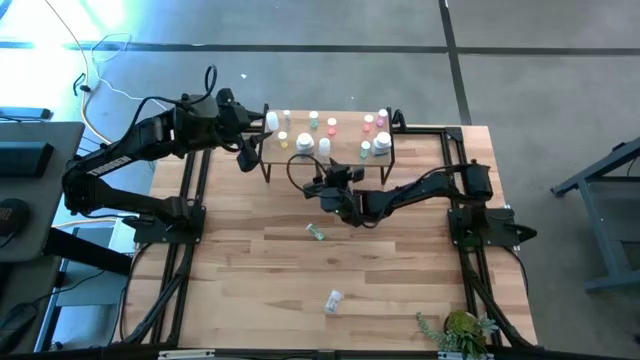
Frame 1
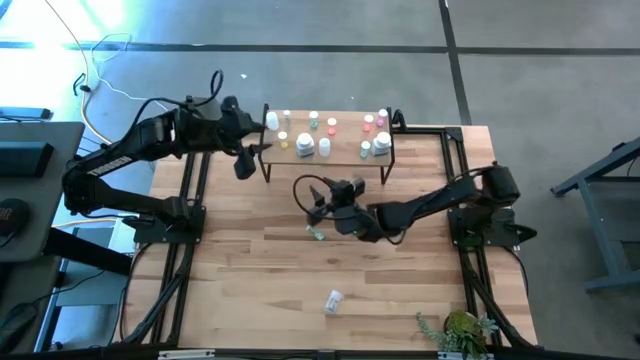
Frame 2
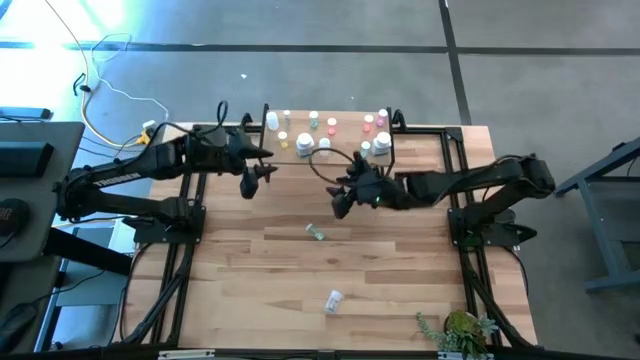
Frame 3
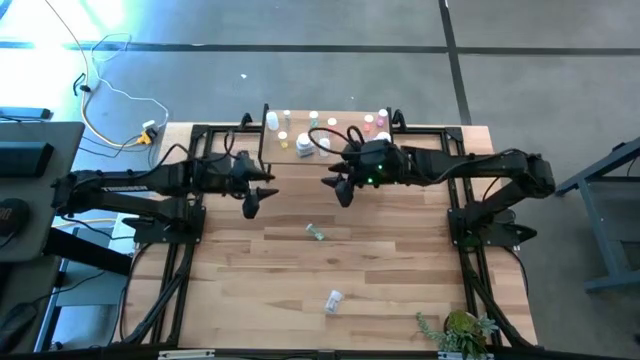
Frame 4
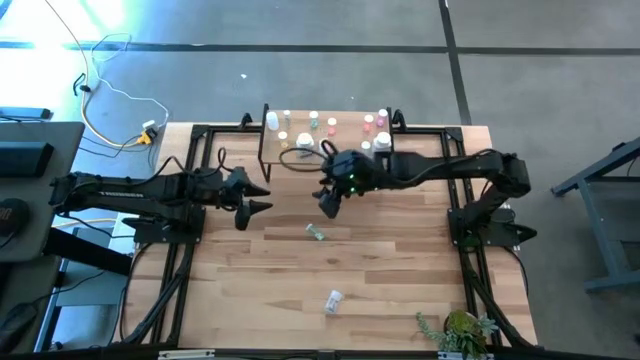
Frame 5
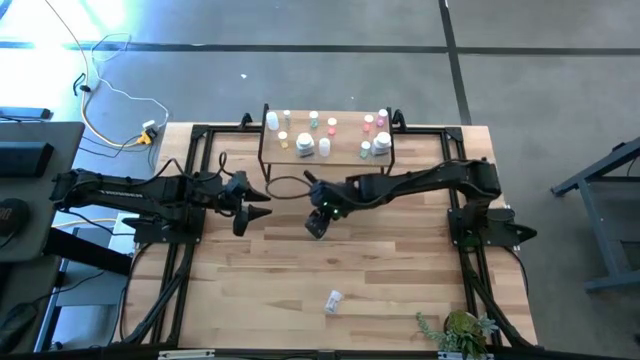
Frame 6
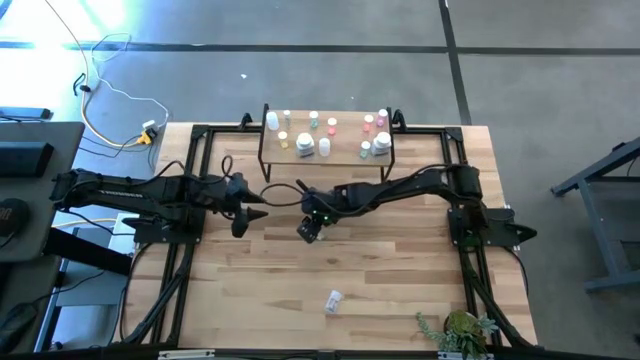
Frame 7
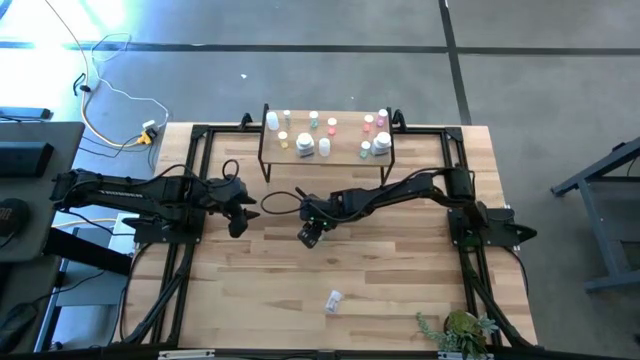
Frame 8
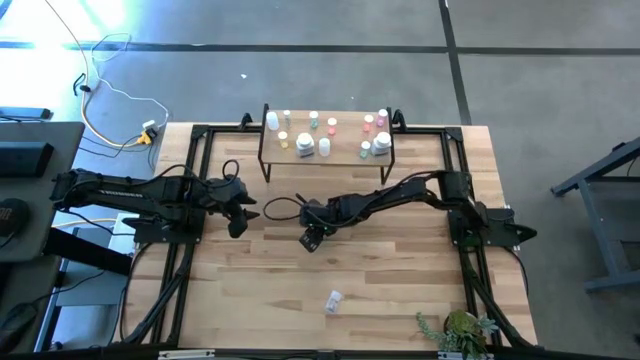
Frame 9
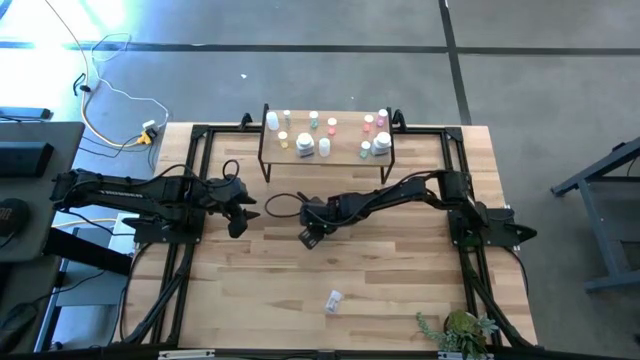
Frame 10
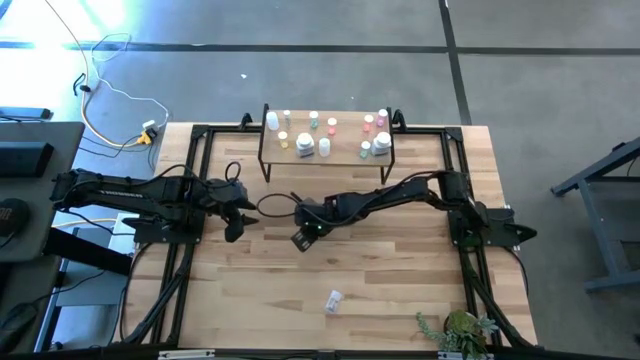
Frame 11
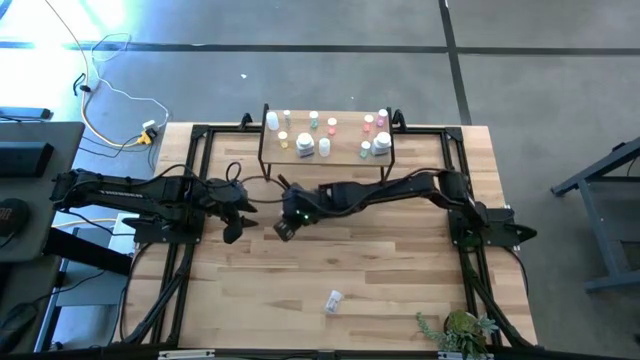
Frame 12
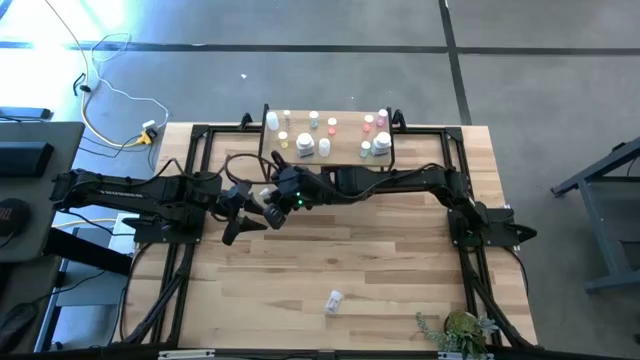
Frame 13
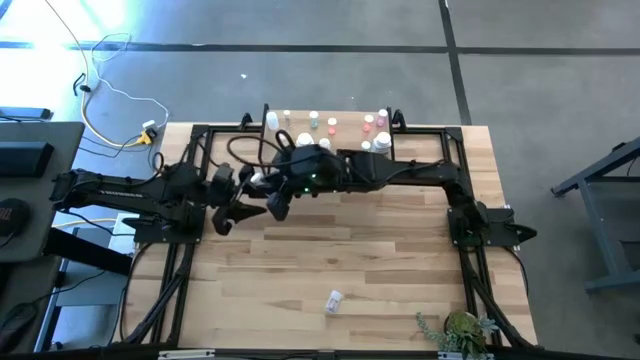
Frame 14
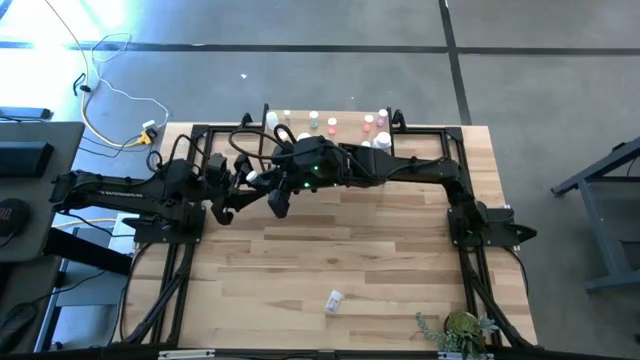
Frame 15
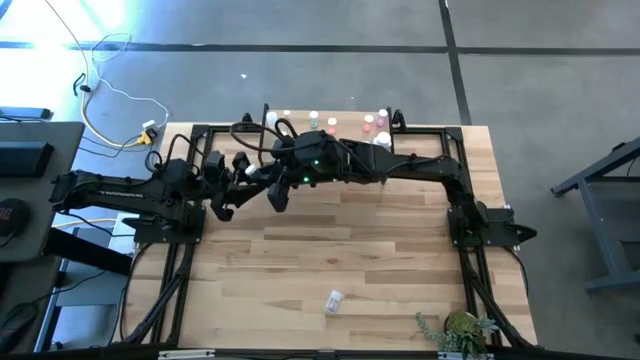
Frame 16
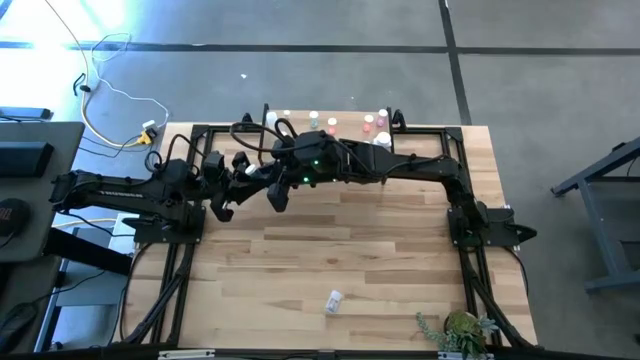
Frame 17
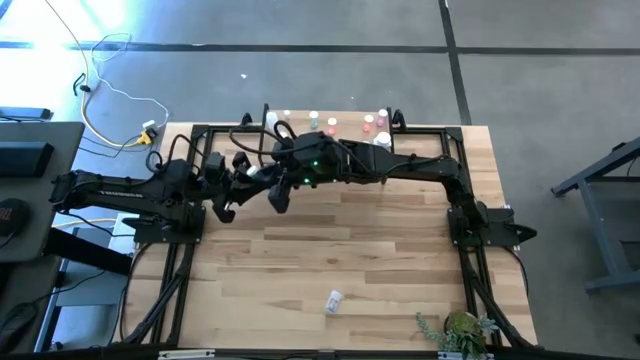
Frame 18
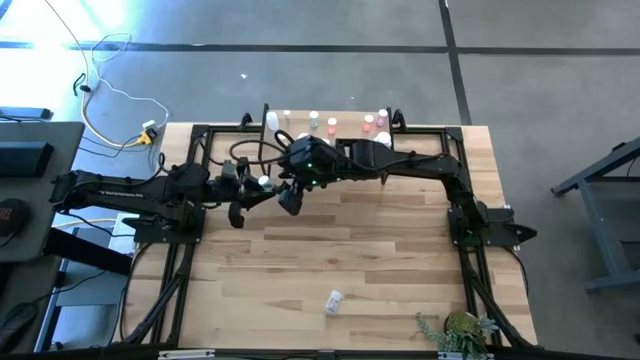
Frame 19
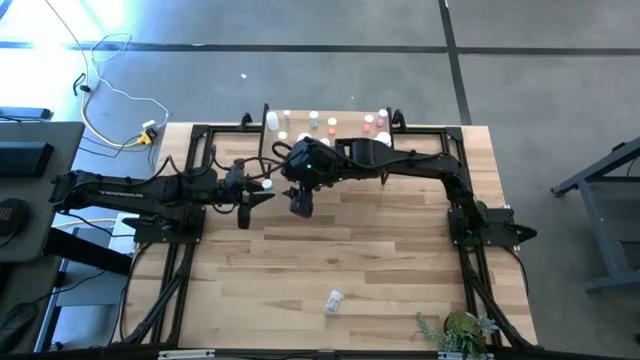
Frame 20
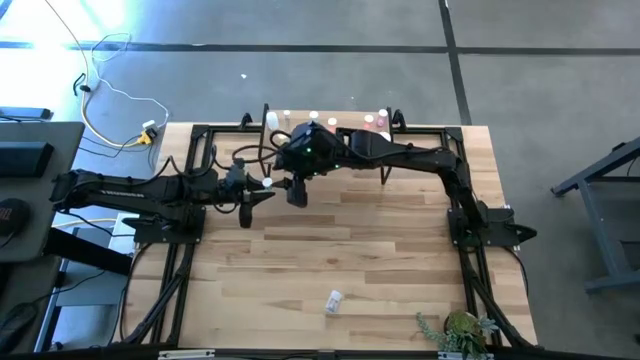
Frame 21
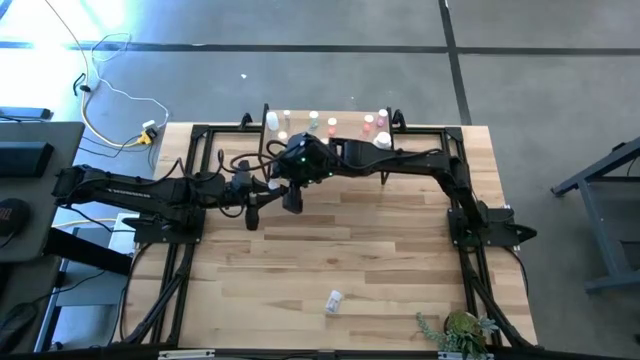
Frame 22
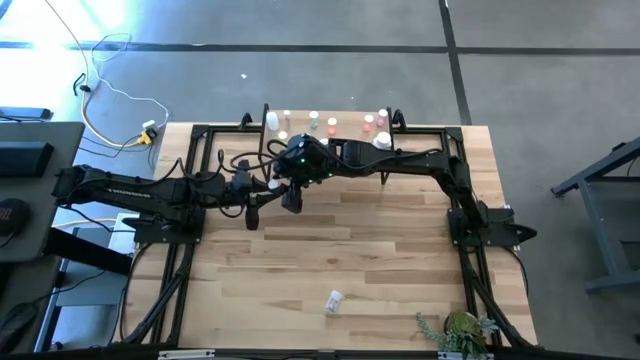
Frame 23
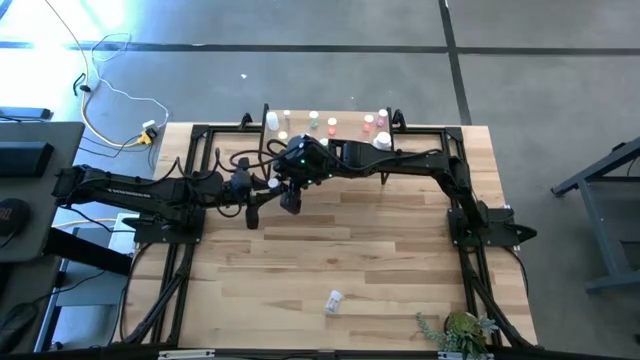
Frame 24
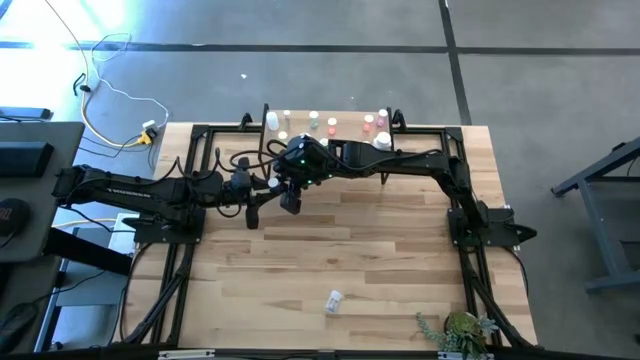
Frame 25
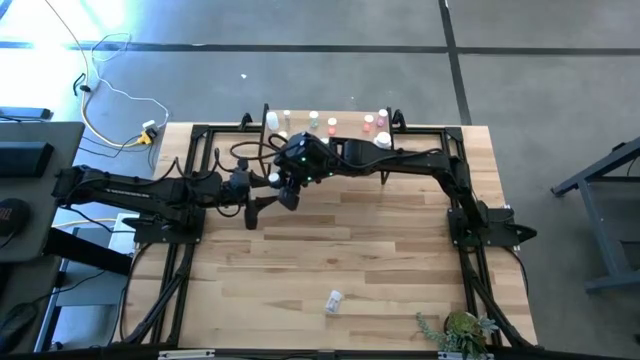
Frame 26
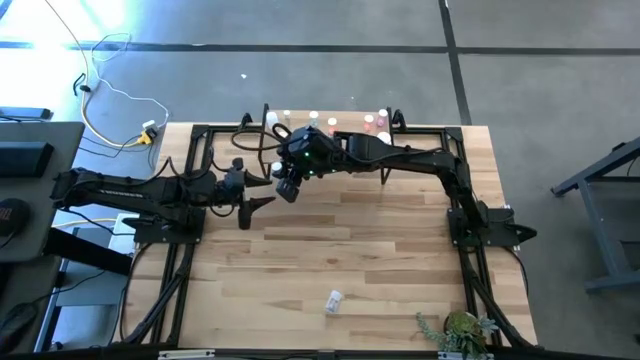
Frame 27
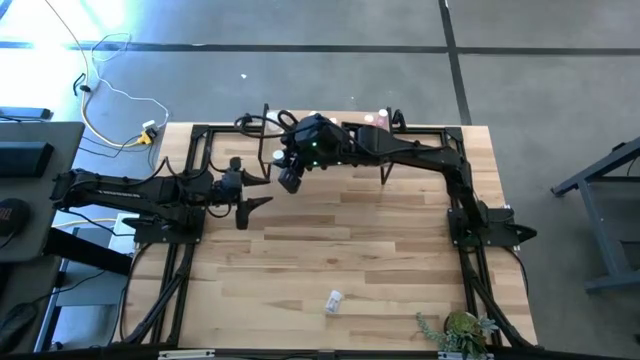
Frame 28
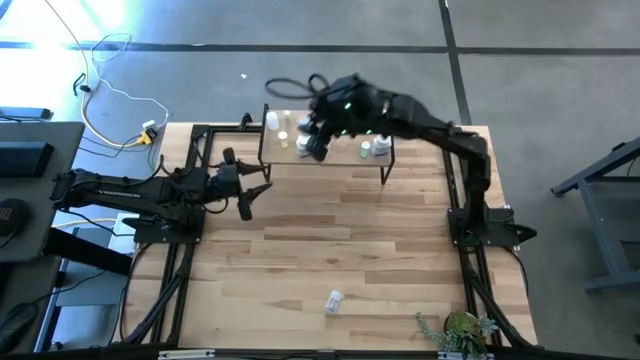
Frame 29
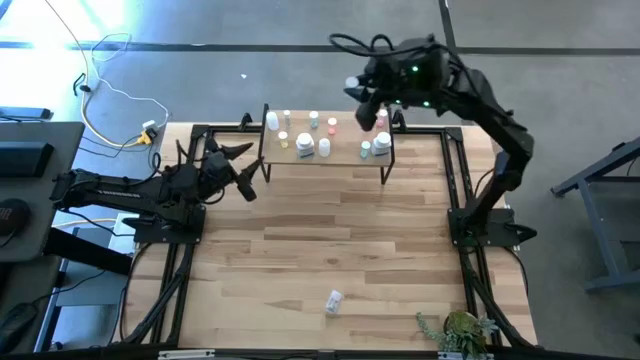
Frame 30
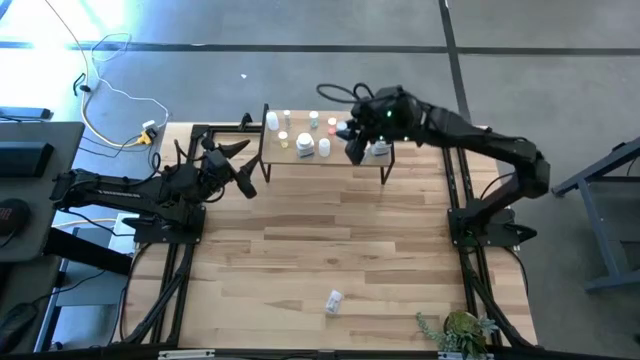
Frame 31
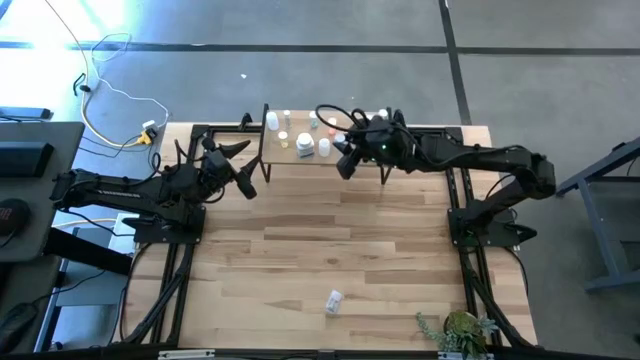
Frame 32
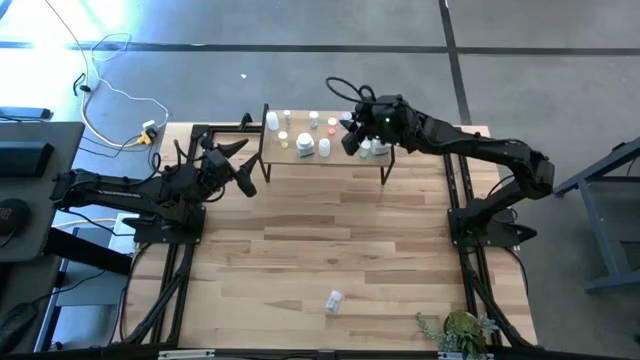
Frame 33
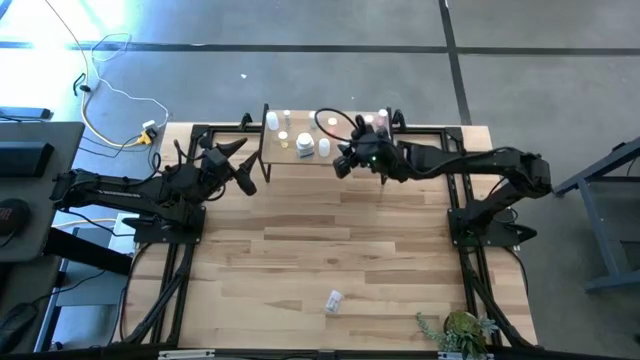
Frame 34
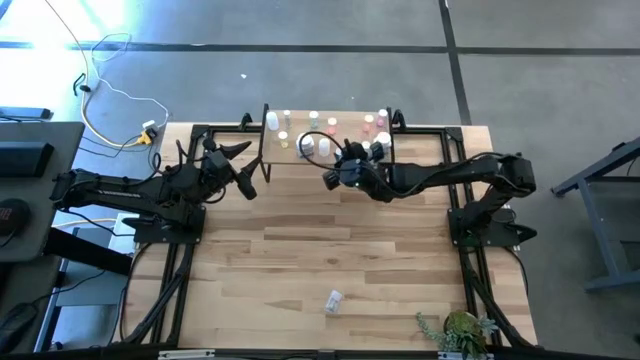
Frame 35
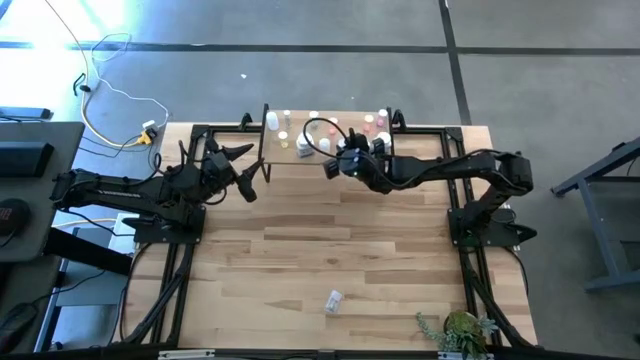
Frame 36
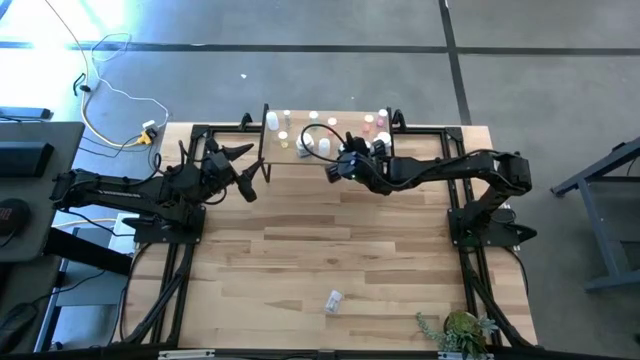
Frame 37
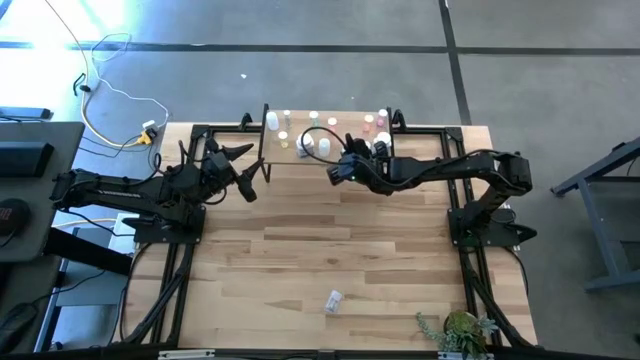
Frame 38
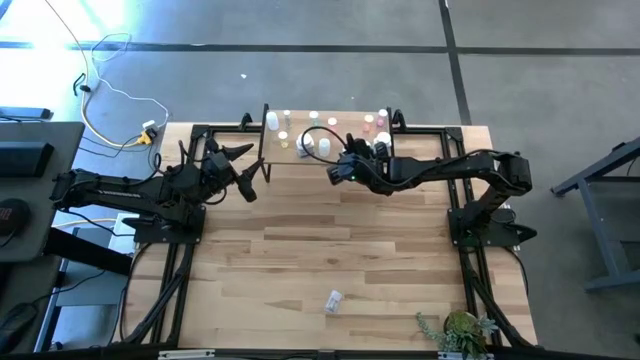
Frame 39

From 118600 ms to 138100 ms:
Task: Pick and place medicine bottles onto shelf by color
Put the blue pill bottle on the shelf

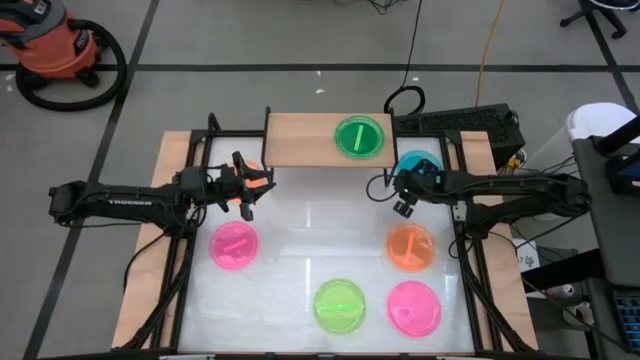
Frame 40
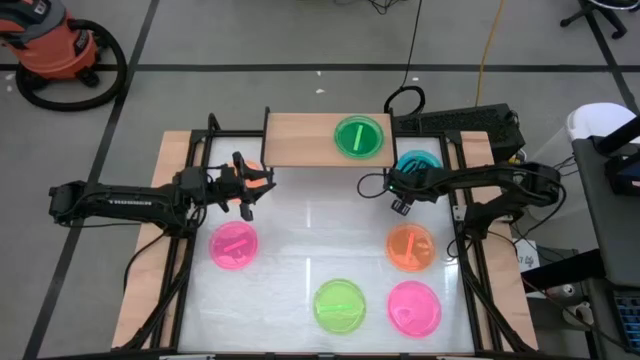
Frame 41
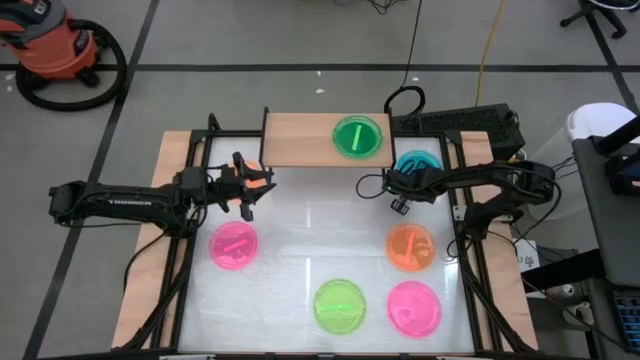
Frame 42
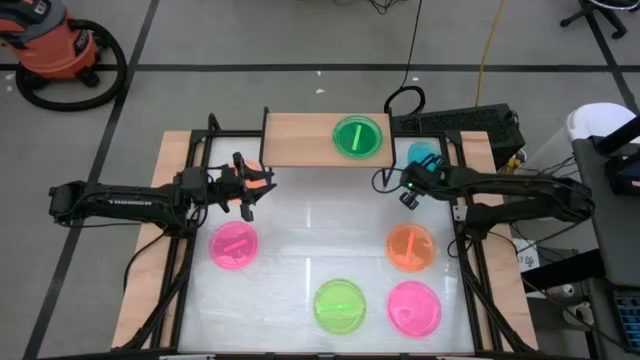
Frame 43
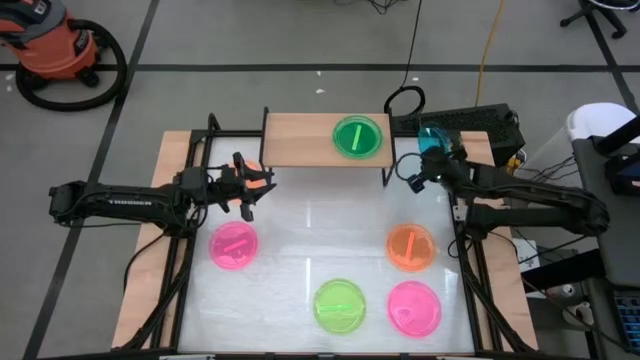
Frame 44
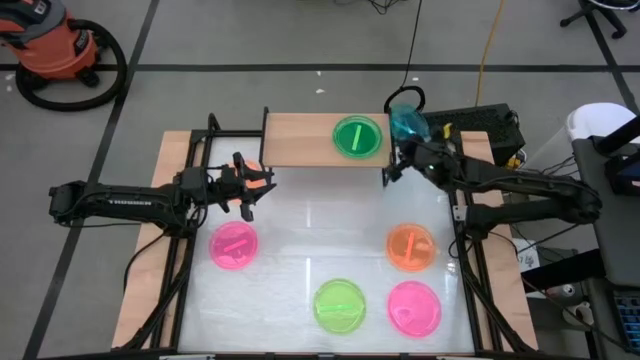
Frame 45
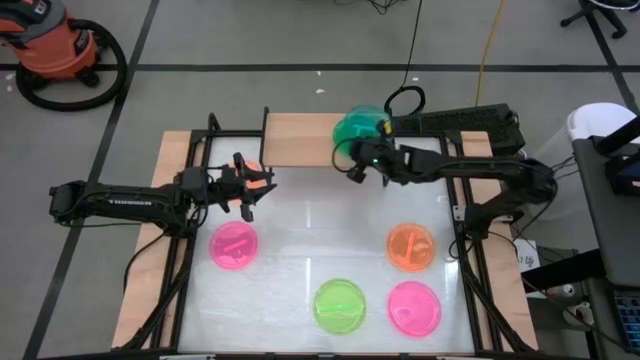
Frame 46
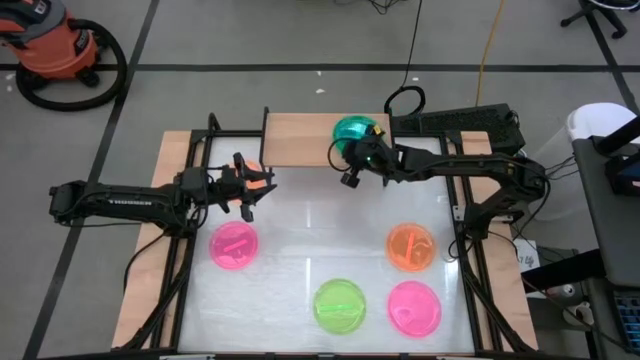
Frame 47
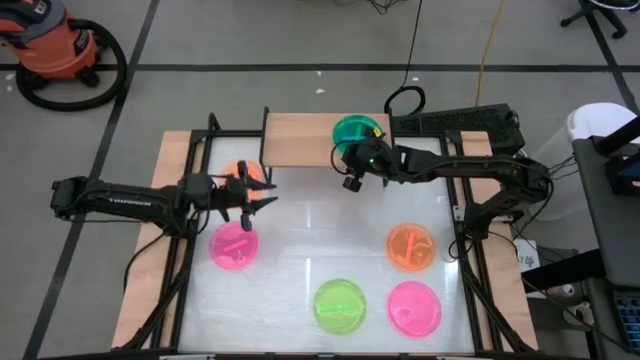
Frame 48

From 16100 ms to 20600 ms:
Task: Place and stack plates onto a shelf
Stack the blue transparent plate on the green transparent plate on the shelf
